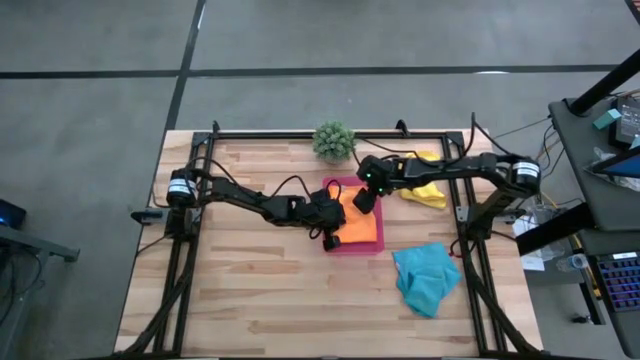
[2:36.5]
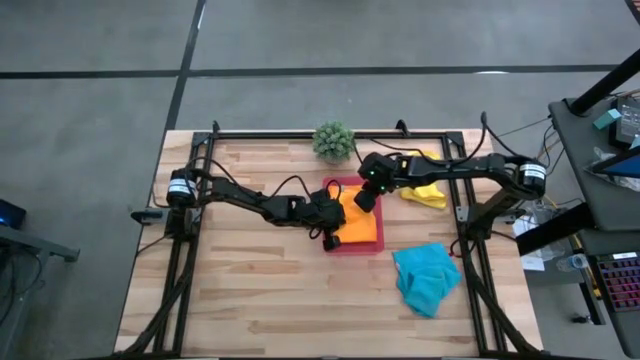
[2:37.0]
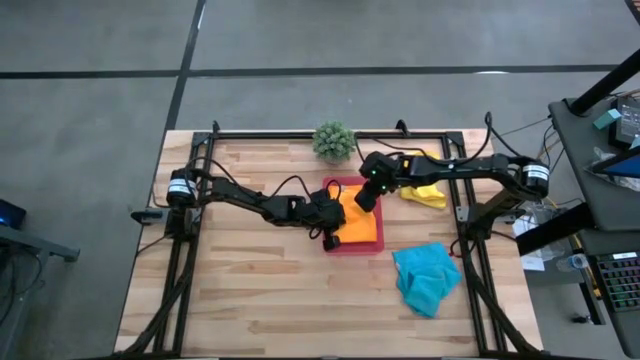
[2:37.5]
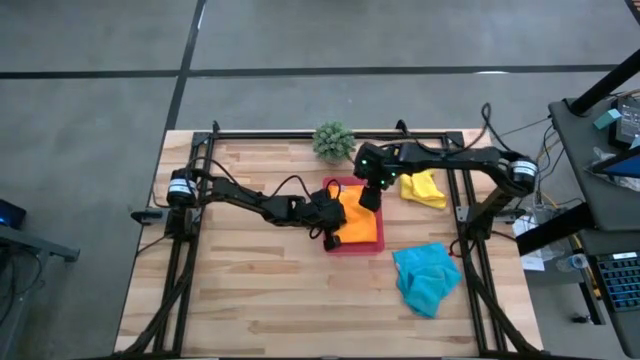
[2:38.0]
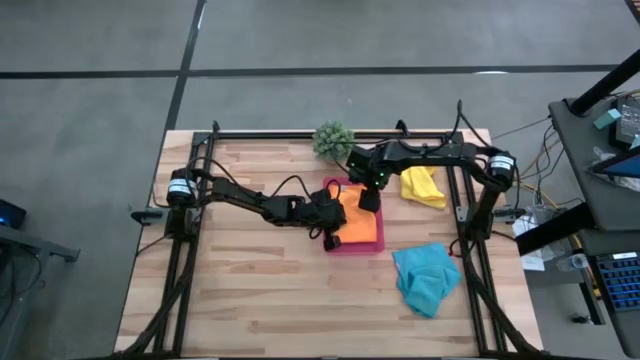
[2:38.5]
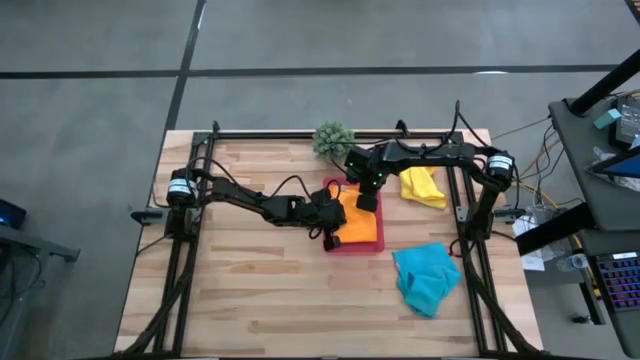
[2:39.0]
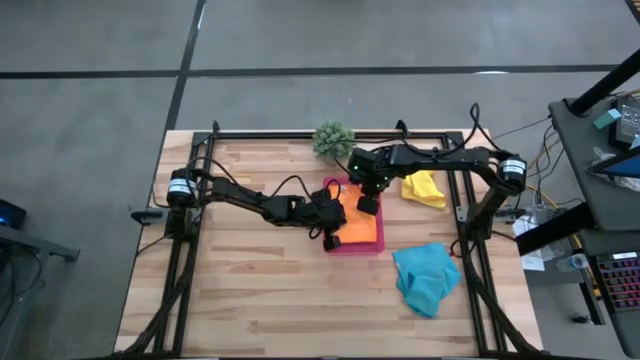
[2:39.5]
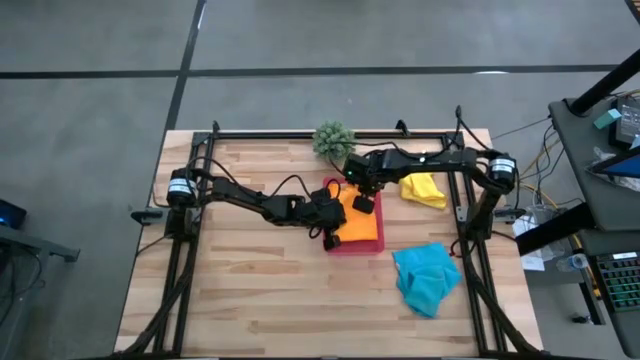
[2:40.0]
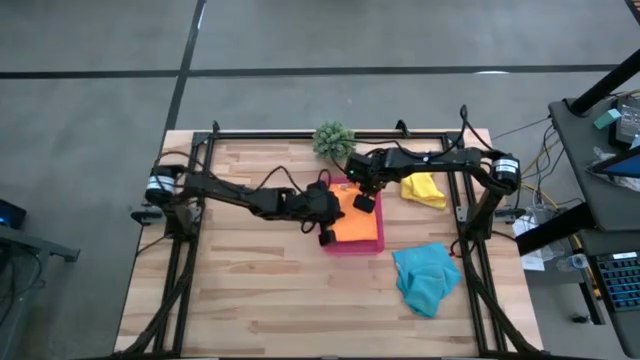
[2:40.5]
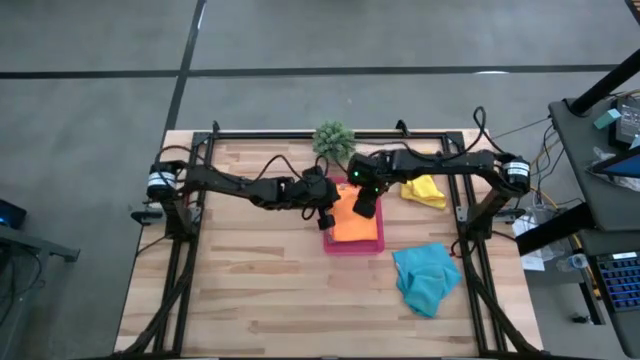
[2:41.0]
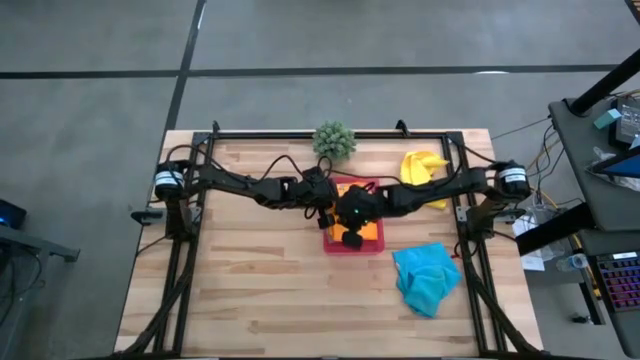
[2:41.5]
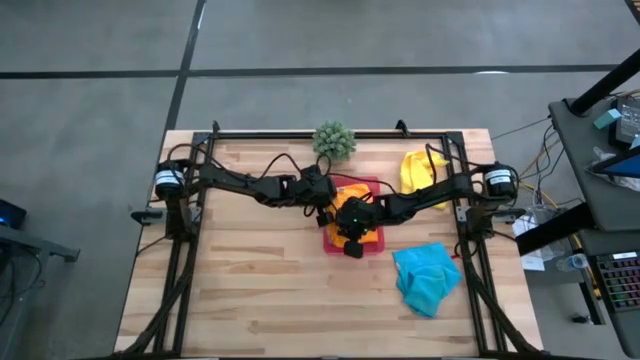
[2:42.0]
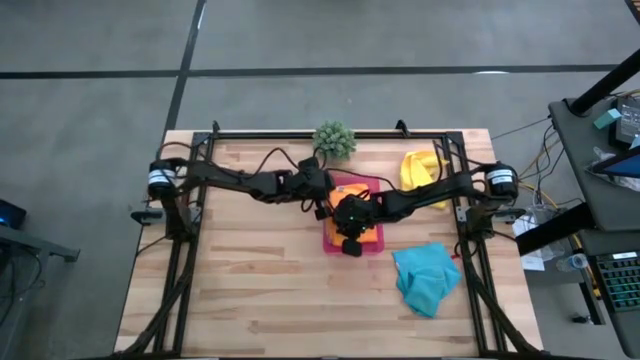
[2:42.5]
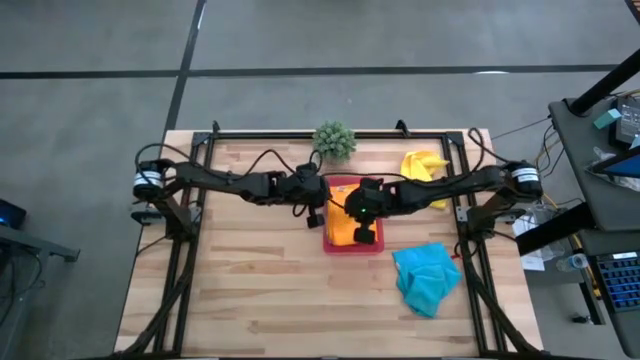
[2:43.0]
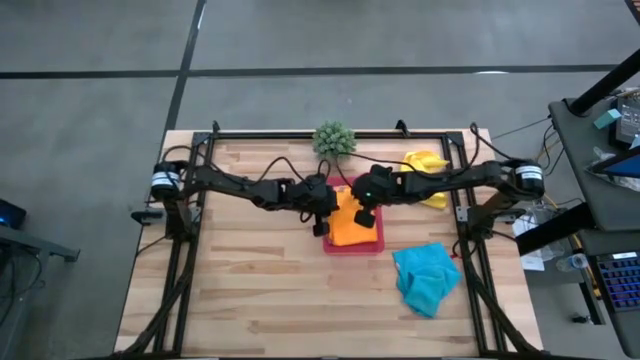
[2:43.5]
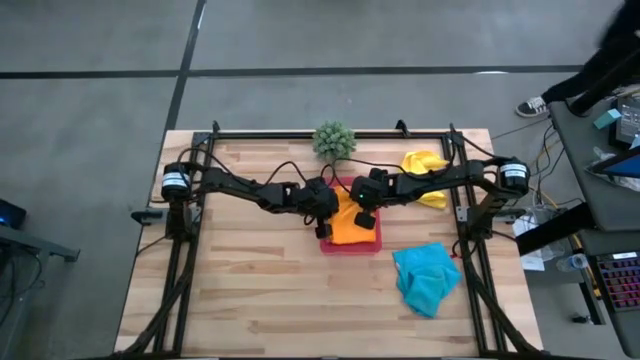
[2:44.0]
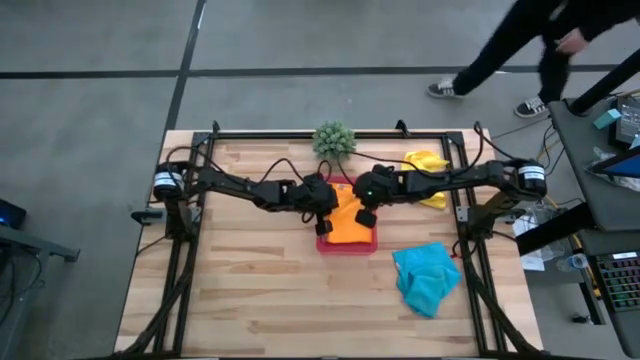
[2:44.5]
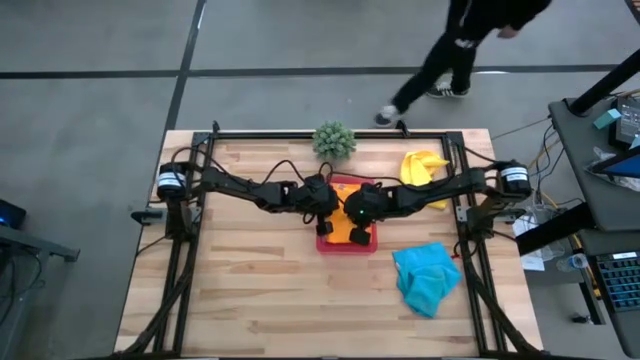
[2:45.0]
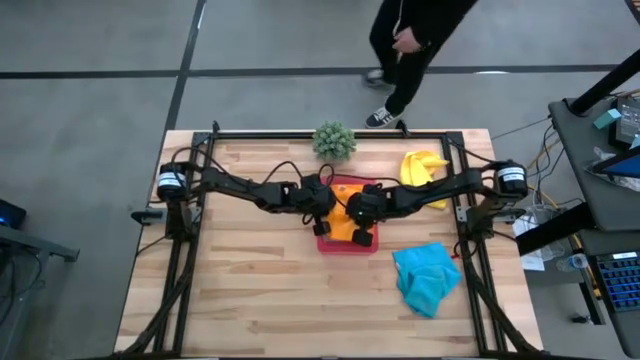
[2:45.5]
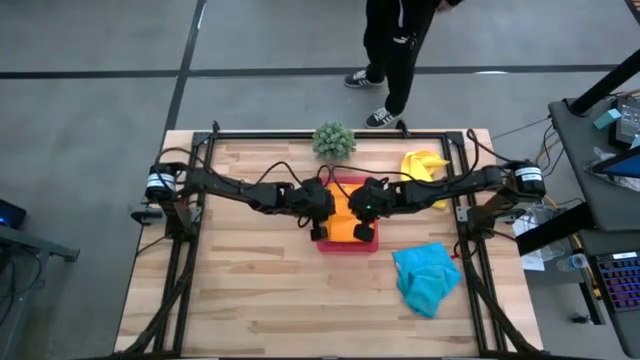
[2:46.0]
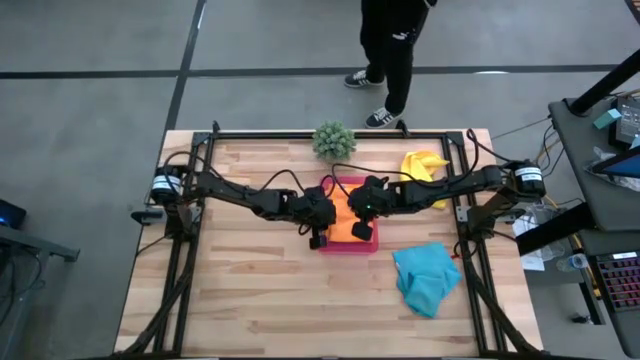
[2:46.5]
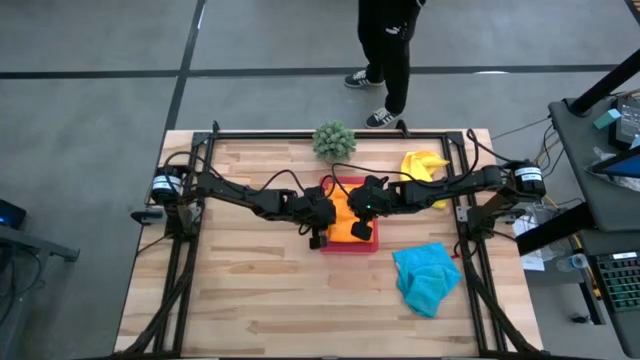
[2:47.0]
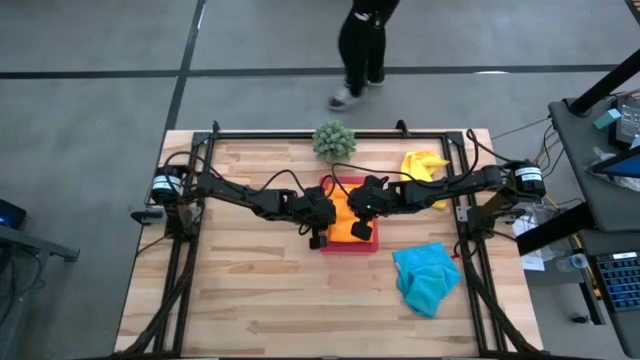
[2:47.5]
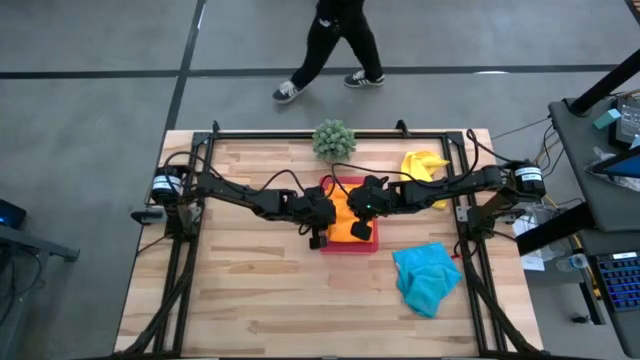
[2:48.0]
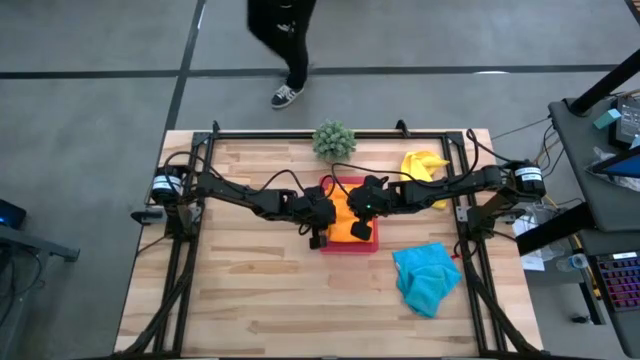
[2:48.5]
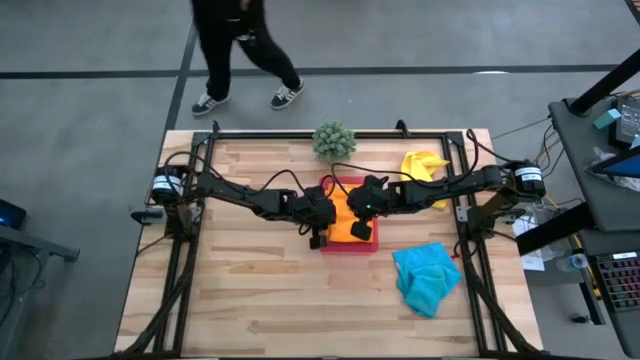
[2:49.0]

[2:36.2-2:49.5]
Task: Fold microfiber towels
Put the orange towel into the red bin

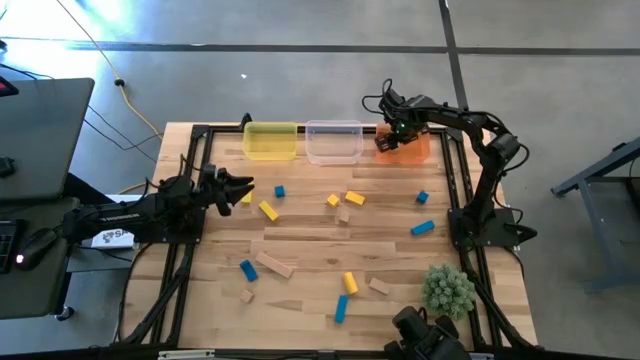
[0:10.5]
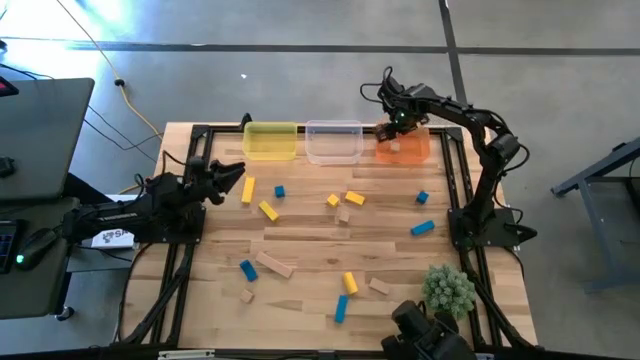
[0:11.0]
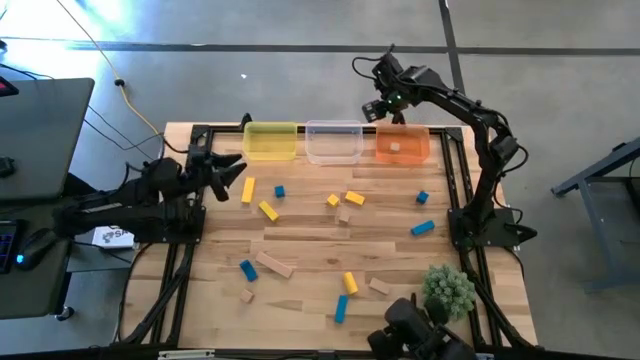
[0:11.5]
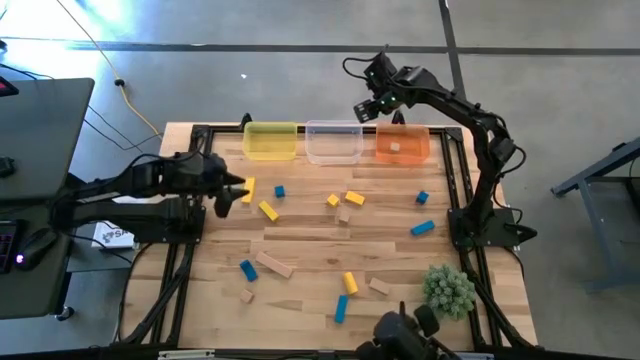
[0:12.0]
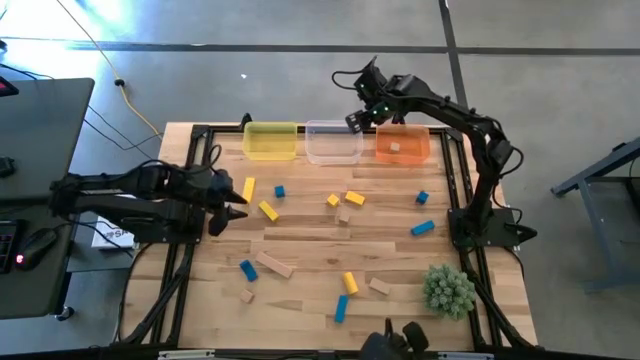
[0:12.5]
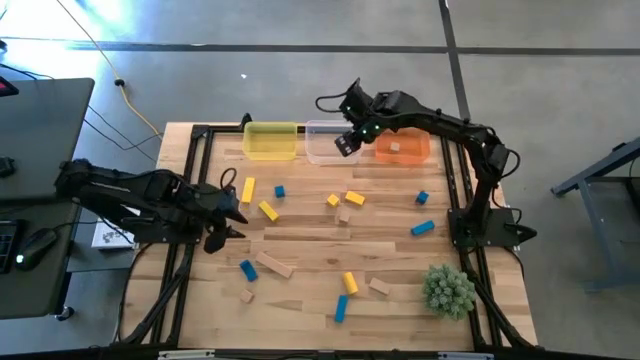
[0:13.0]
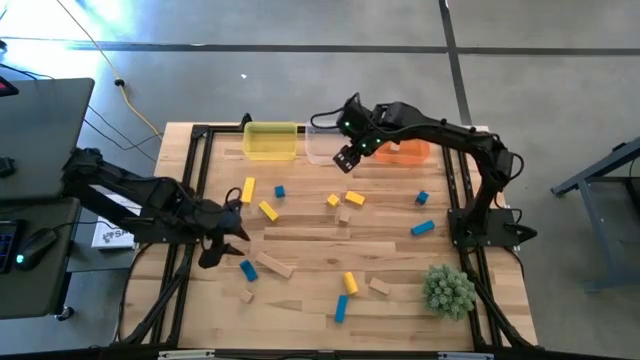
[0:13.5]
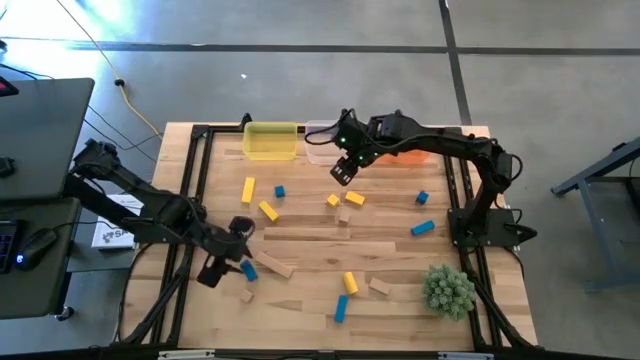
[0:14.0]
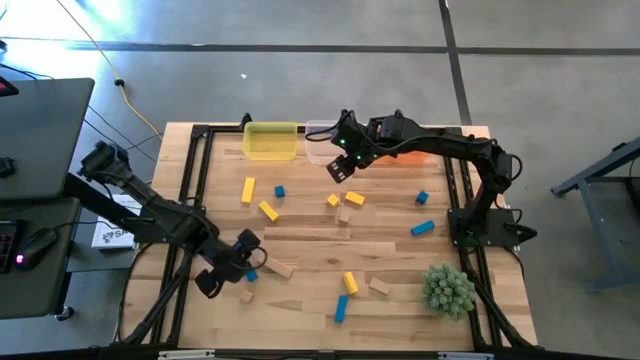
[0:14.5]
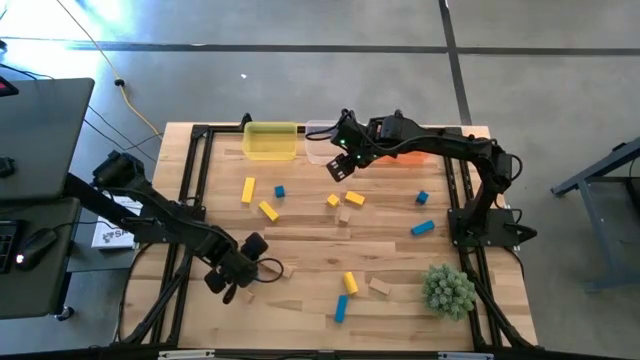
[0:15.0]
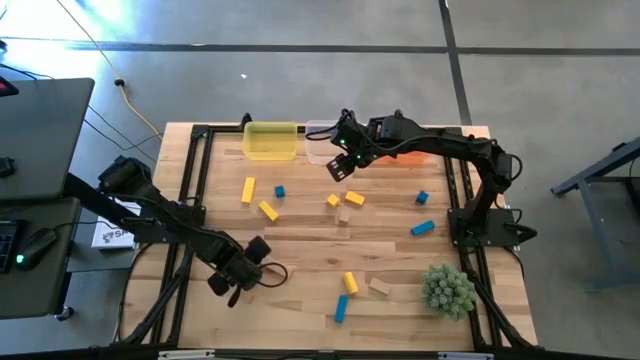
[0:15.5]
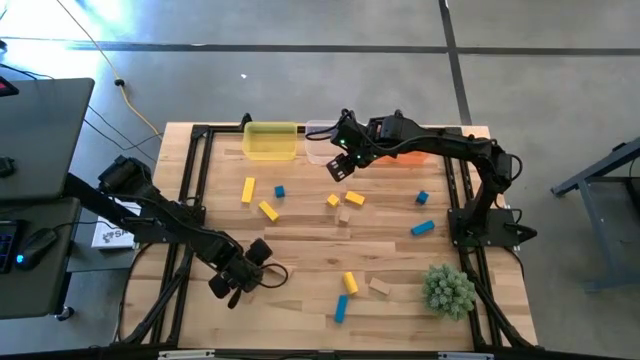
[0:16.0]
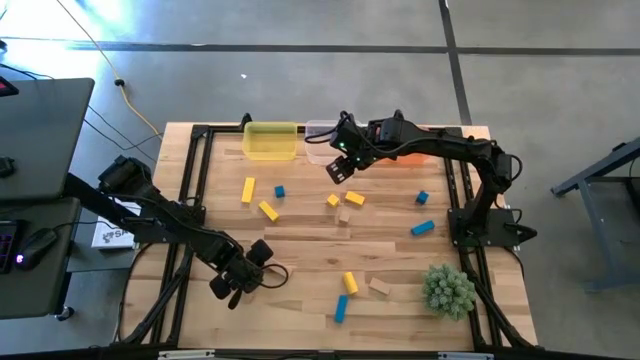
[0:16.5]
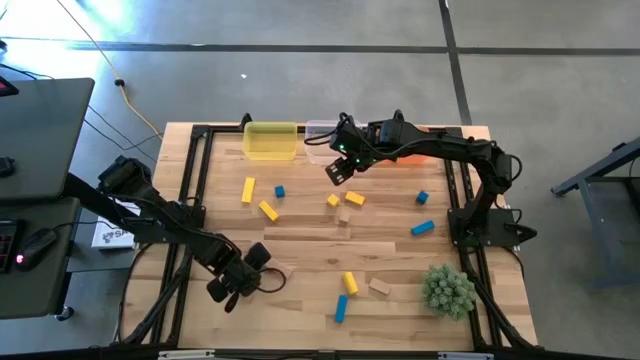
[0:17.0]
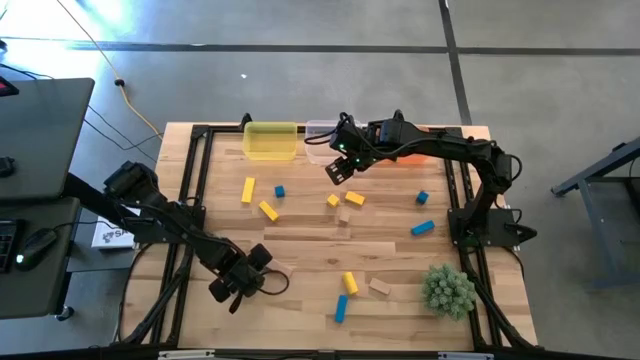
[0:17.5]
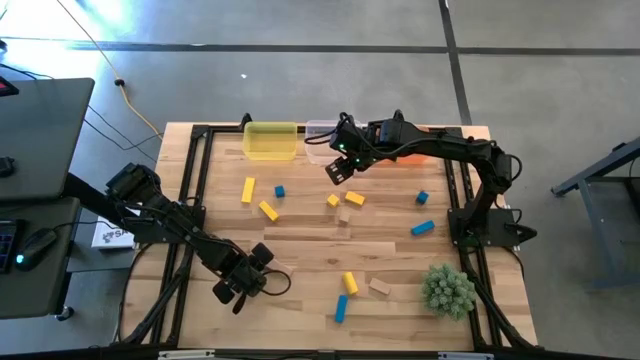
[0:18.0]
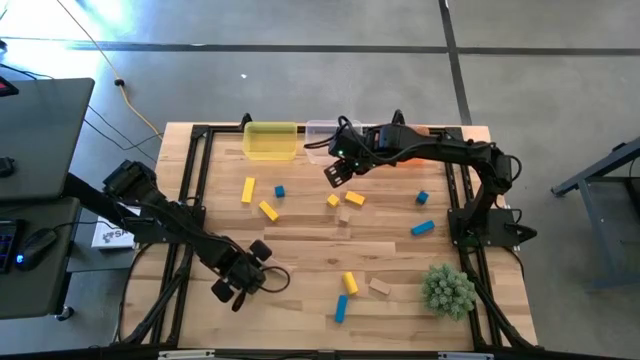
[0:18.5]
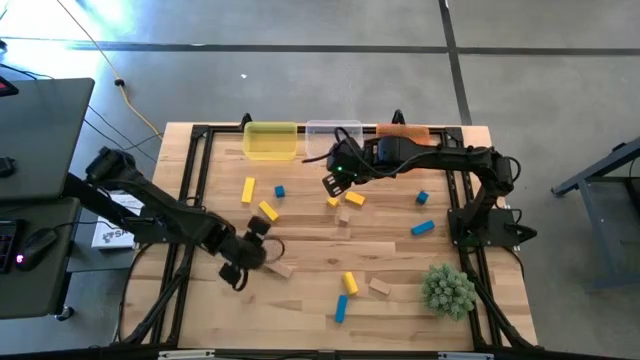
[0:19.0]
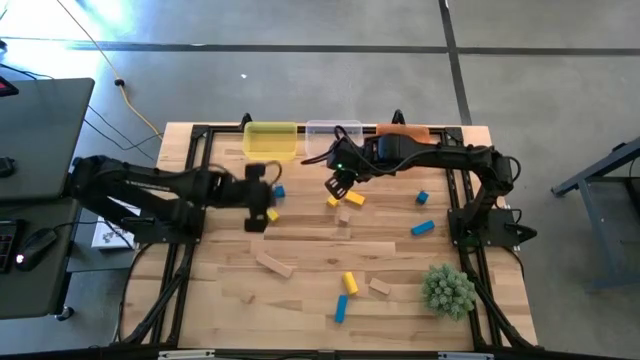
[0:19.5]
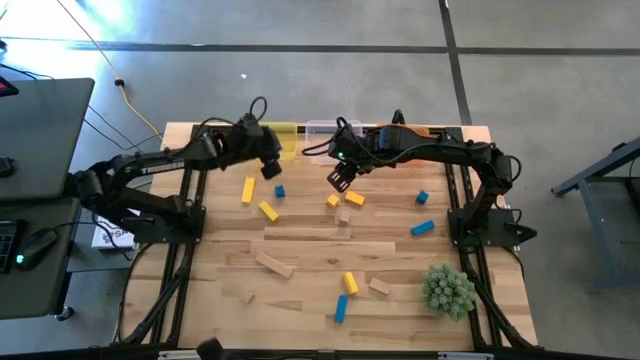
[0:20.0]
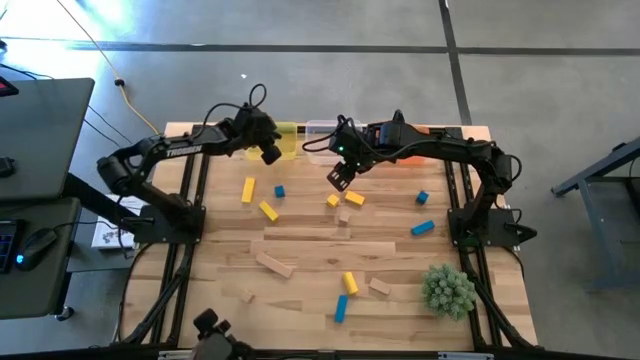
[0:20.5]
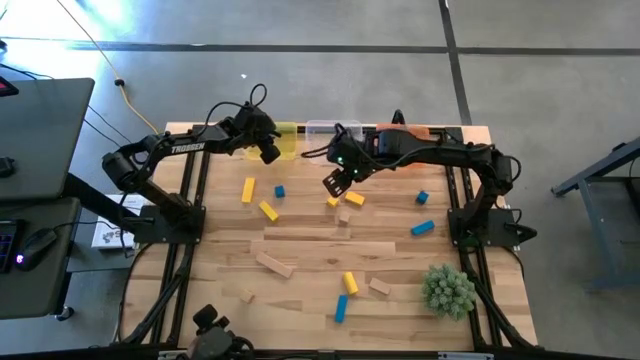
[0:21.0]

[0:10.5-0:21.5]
Task: Sort & place blocks by color
Put the blue block into the yellow bin
